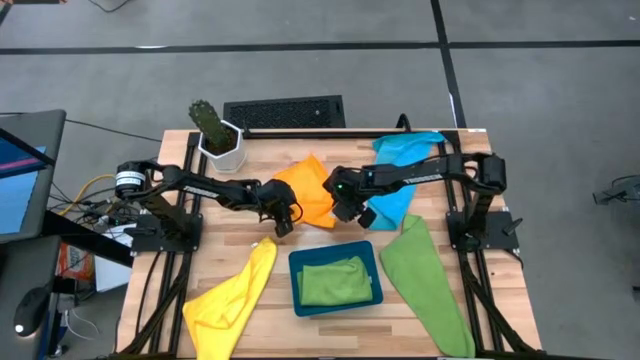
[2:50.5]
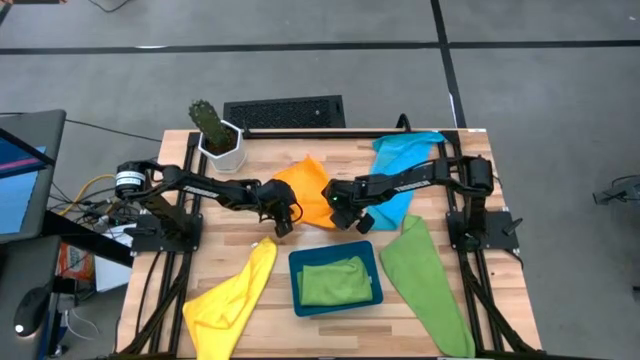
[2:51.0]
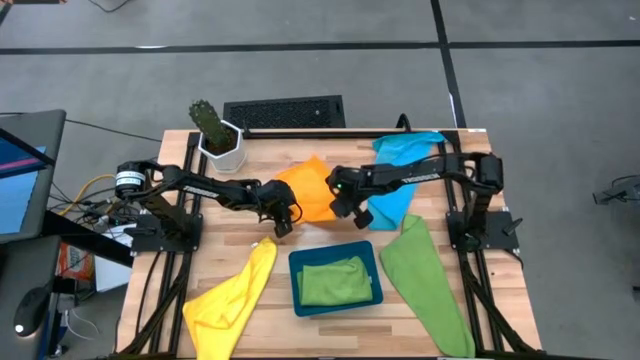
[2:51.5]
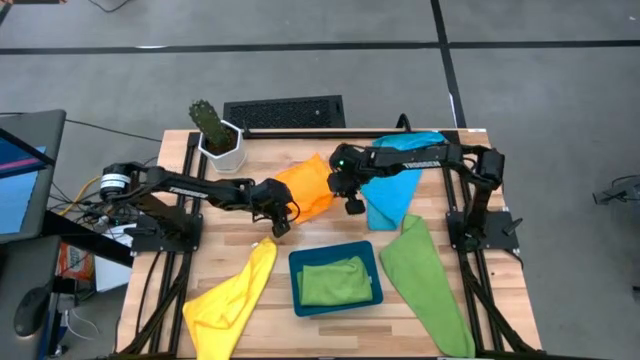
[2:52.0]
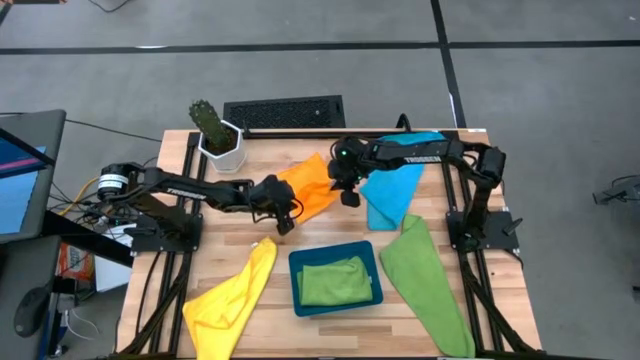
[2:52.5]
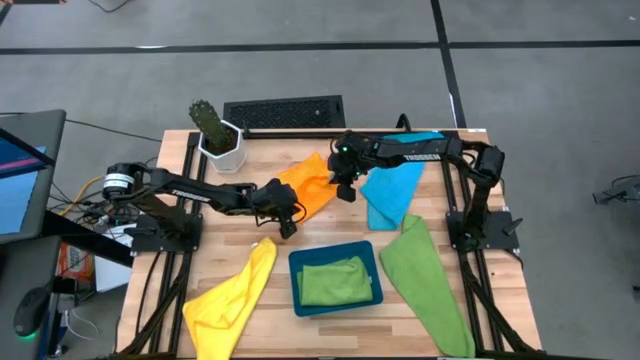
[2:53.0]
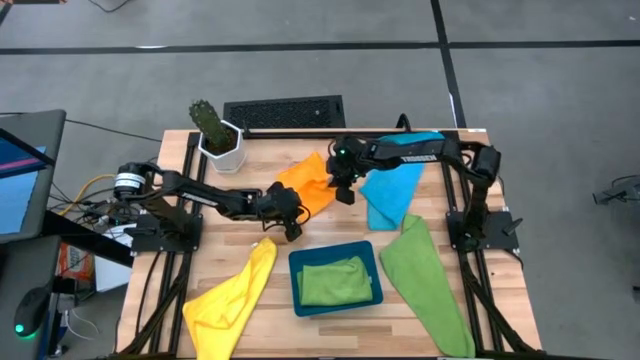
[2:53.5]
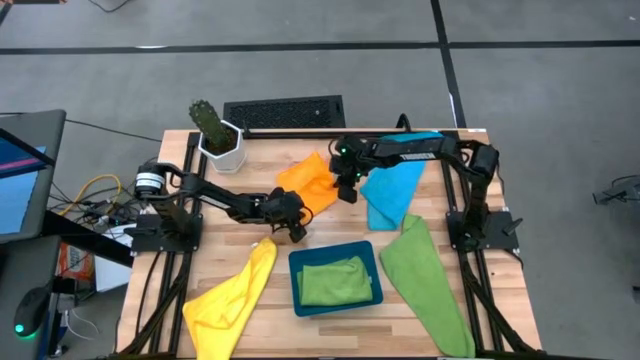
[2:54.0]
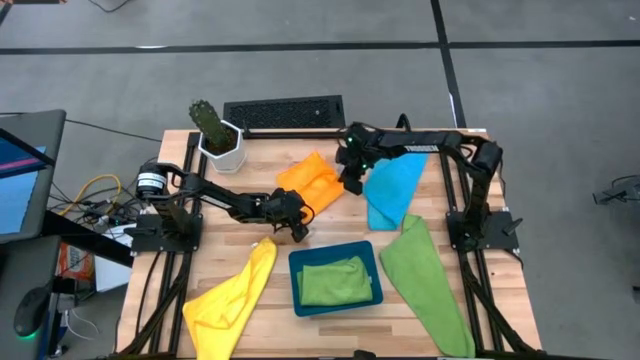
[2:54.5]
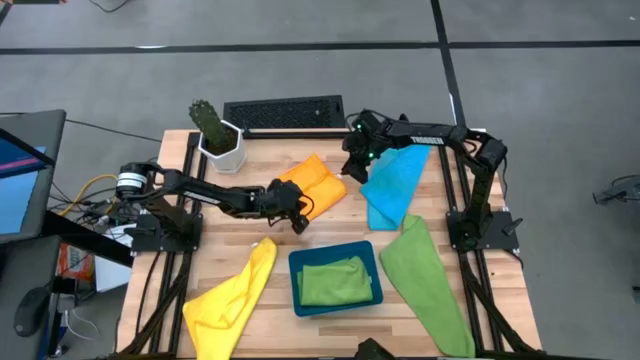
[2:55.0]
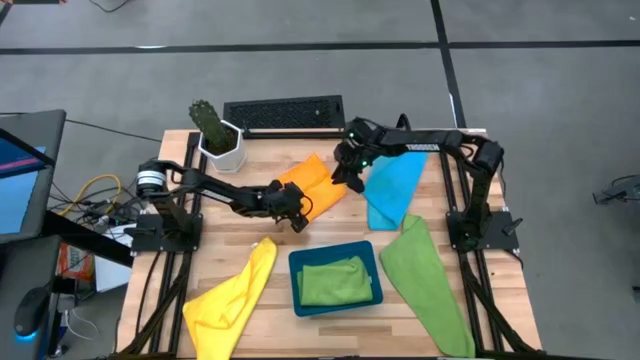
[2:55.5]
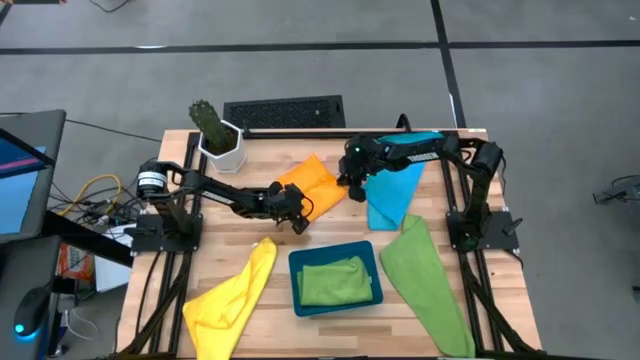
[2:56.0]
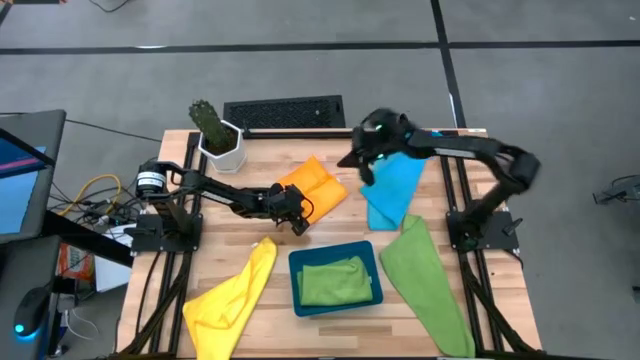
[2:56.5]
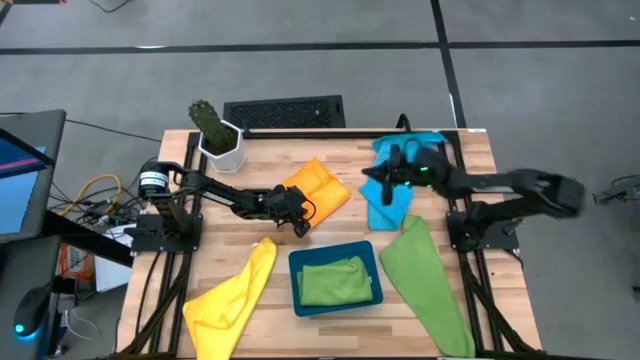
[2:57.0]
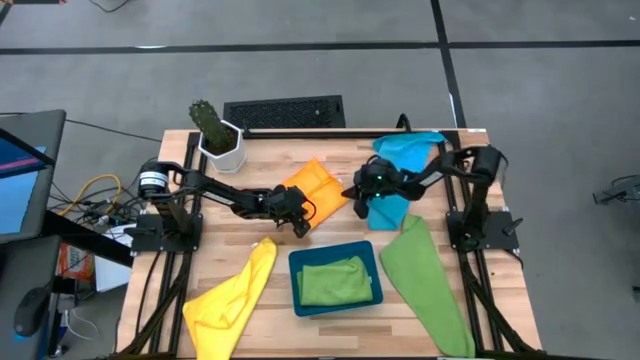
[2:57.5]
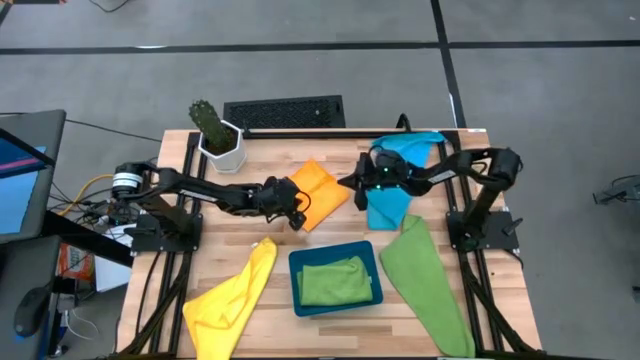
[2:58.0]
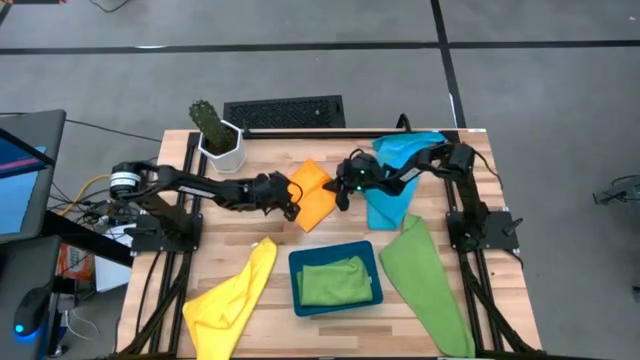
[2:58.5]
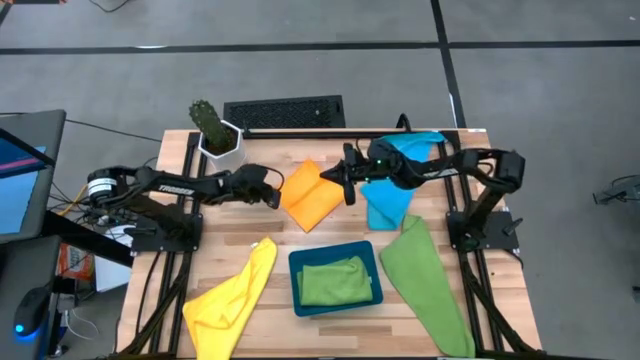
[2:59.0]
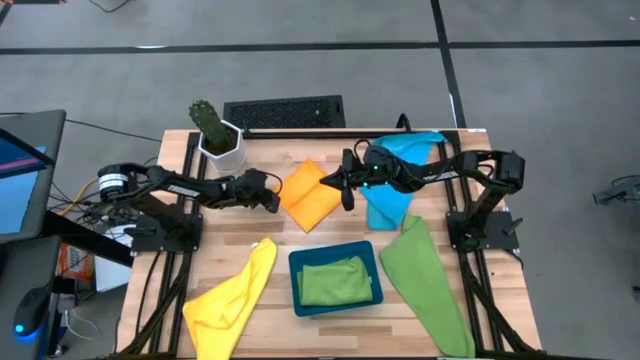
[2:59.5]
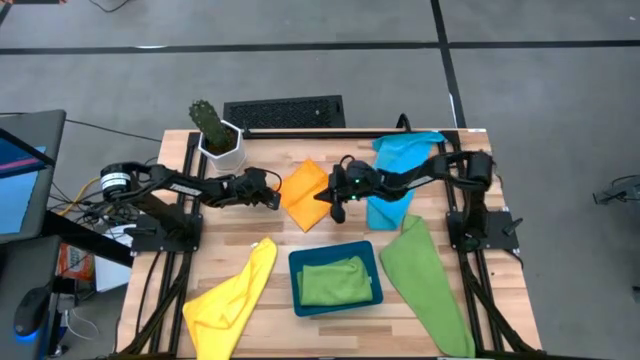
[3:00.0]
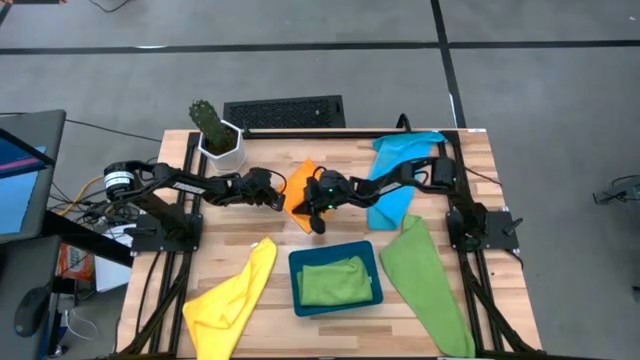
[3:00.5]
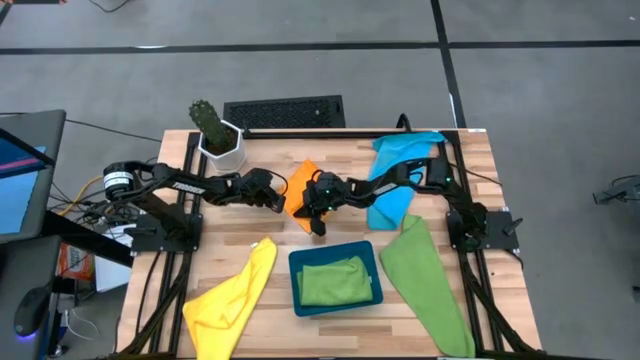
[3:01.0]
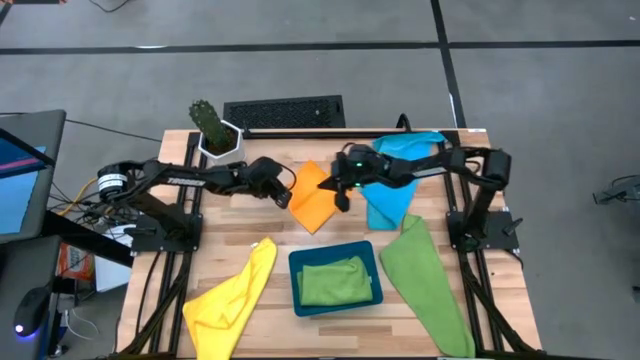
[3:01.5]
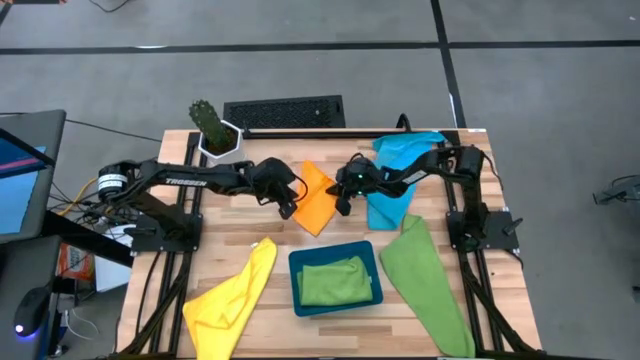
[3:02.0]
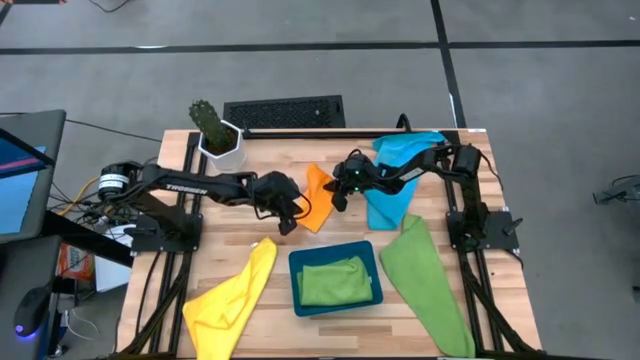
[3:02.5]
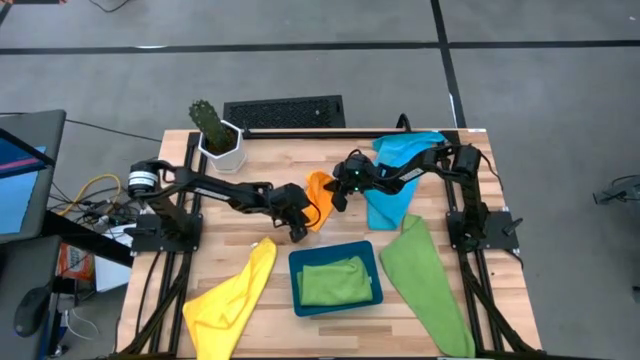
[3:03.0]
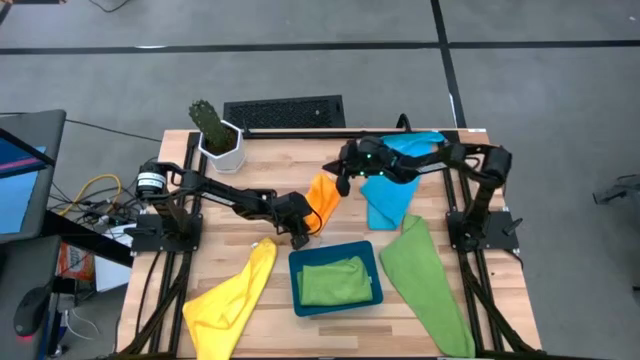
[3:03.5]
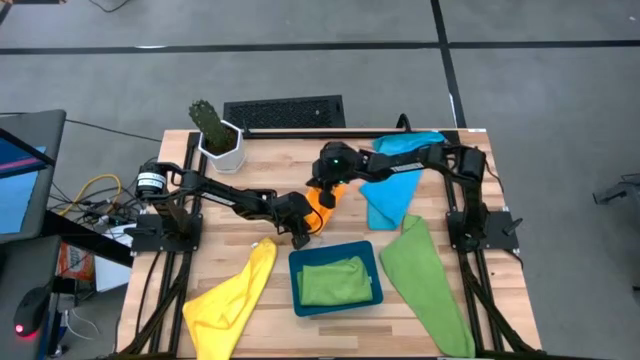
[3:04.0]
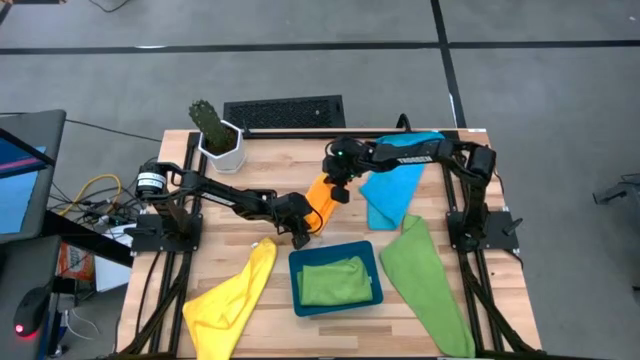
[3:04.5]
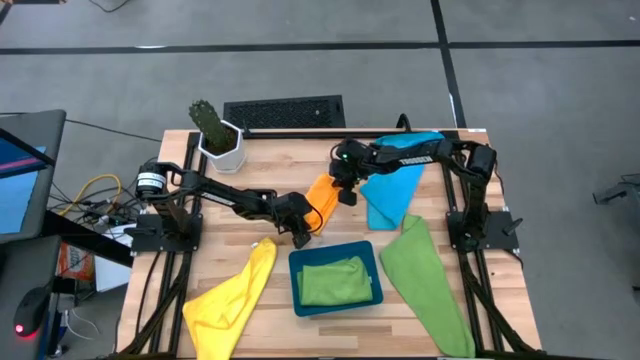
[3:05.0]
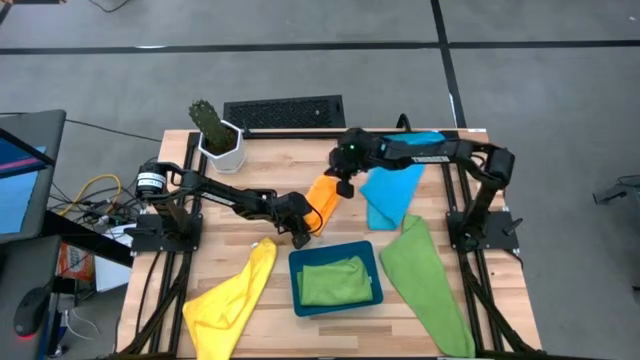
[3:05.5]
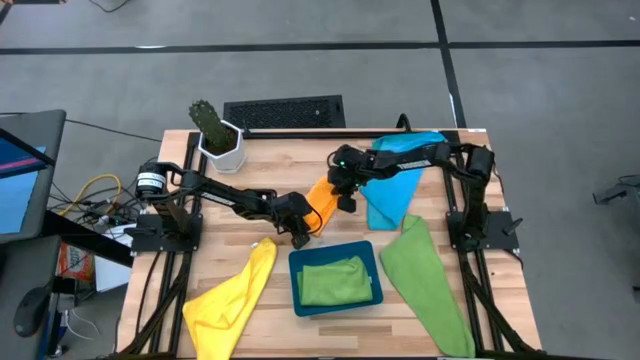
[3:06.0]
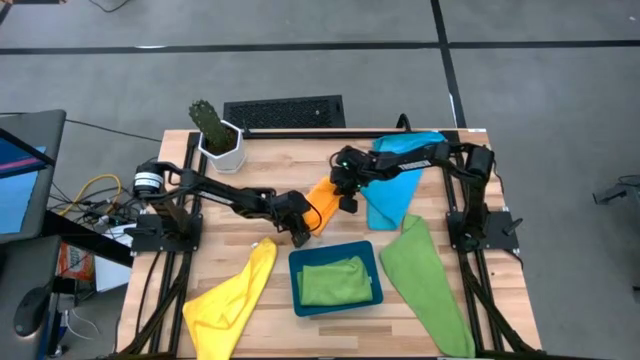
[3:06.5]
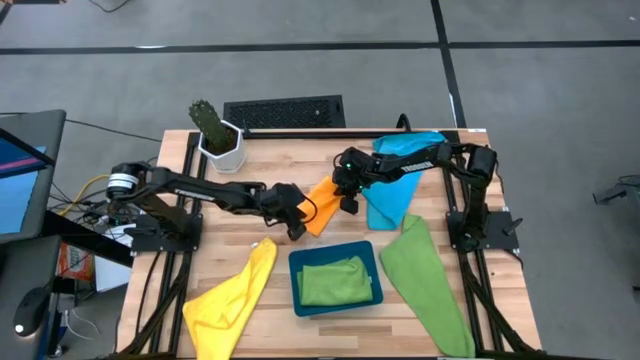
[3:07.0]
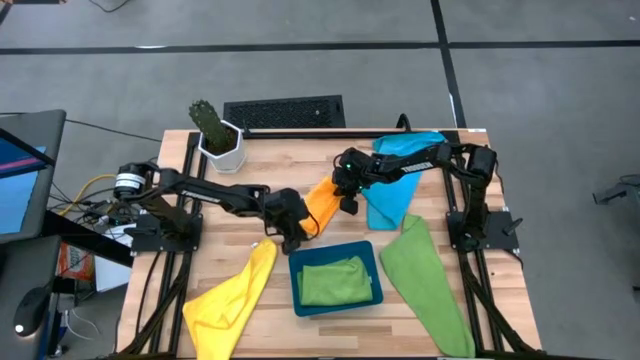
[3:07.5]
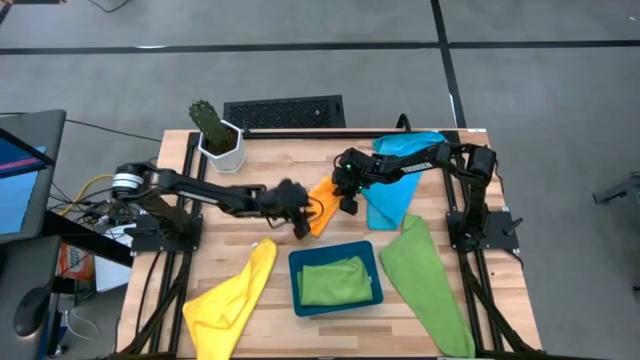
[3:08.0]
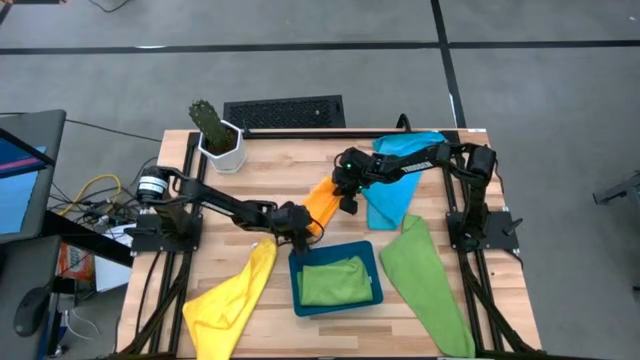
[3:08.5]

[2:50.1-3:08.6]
Task: Fold microfiber towels
Fold the orange microfiber towel

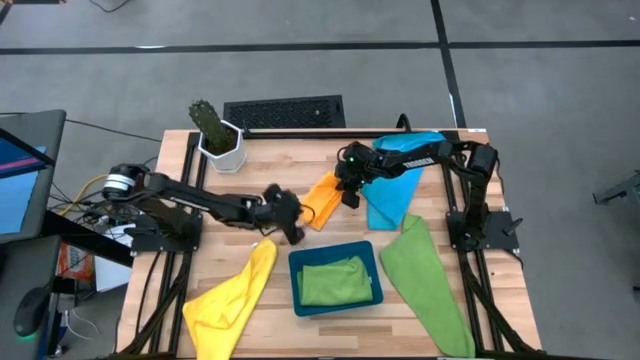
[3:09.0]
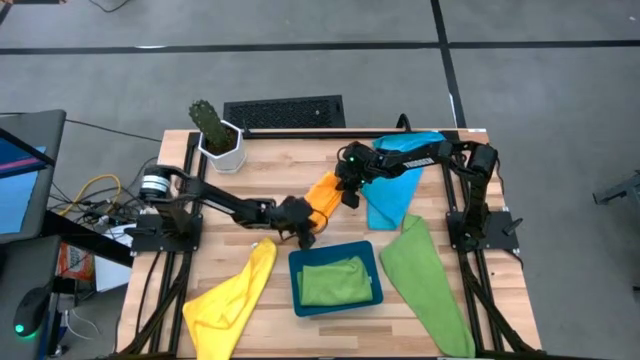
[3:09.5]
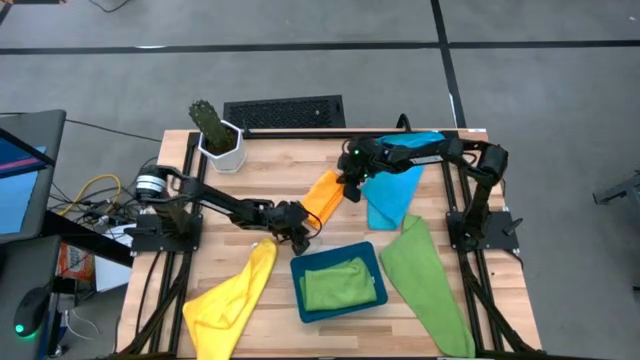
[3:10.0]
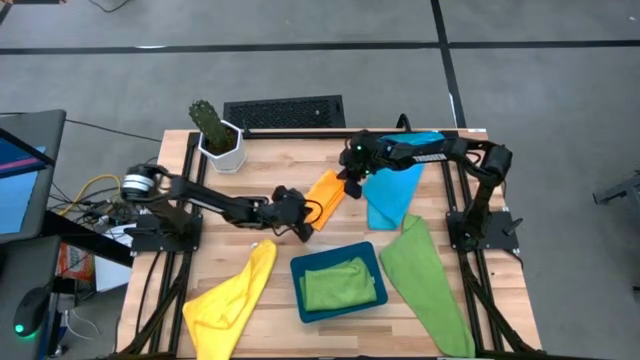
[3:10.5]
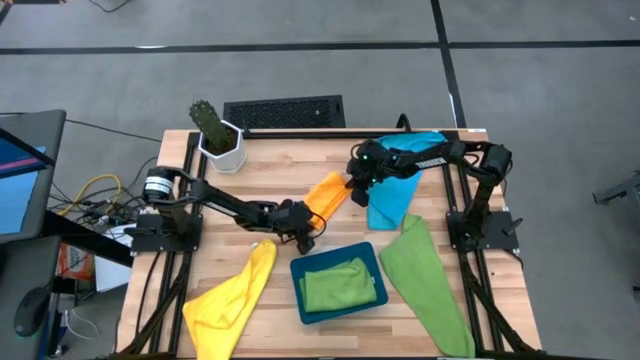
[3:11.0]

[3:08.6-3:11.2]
Fold the orange microfiber towel
